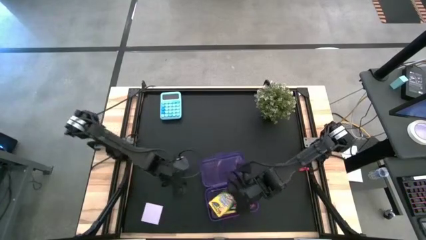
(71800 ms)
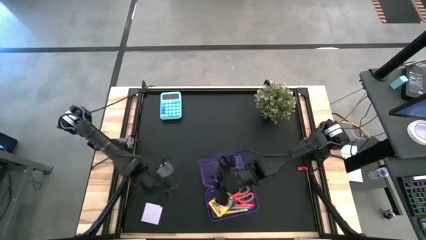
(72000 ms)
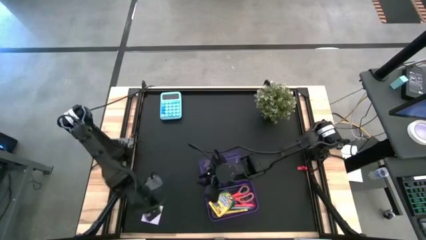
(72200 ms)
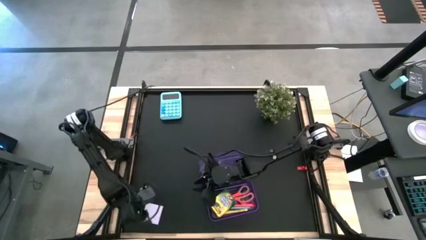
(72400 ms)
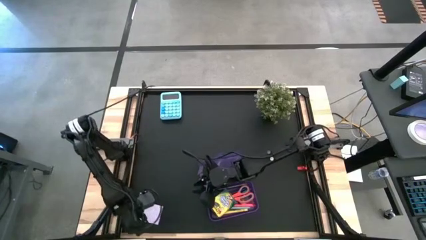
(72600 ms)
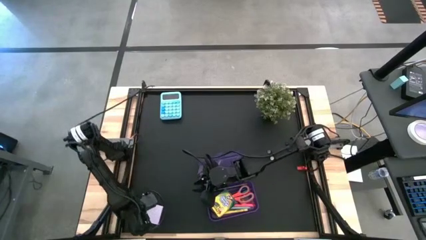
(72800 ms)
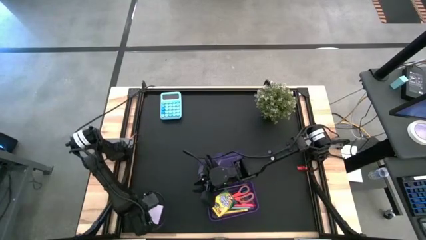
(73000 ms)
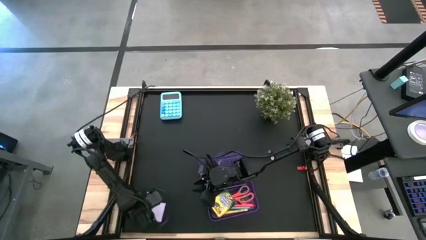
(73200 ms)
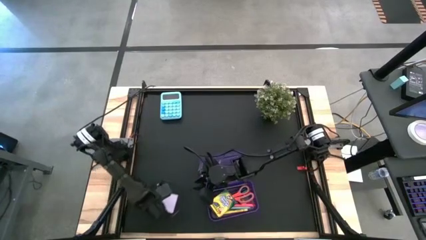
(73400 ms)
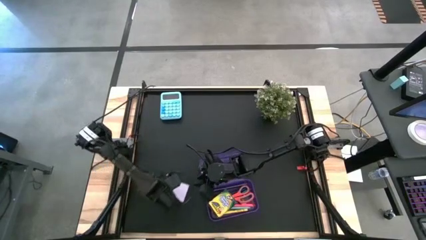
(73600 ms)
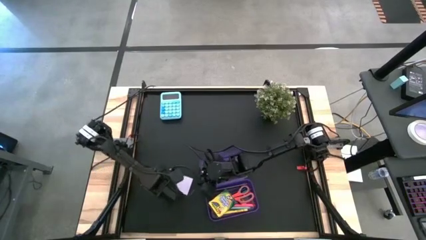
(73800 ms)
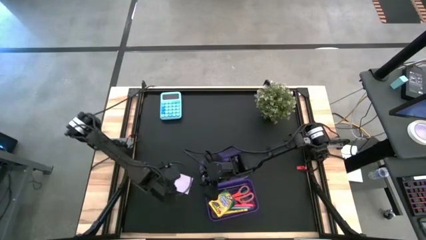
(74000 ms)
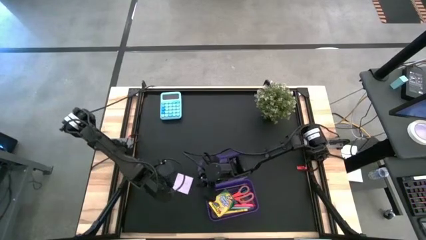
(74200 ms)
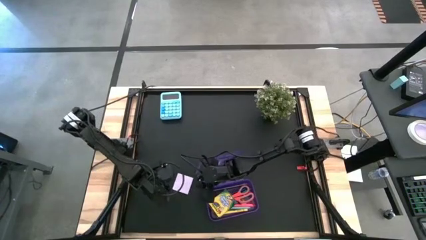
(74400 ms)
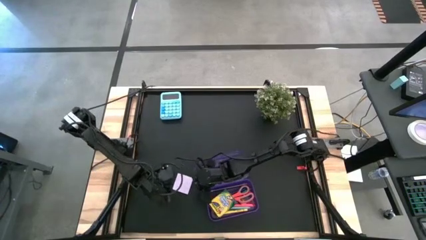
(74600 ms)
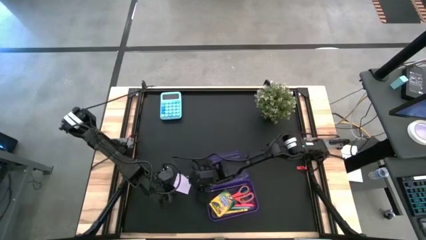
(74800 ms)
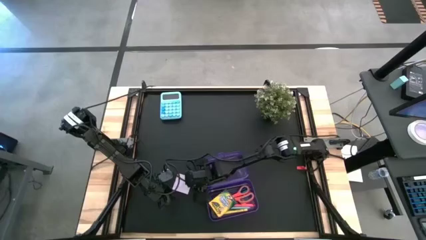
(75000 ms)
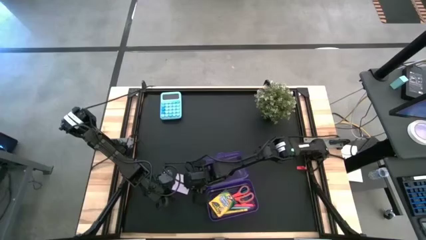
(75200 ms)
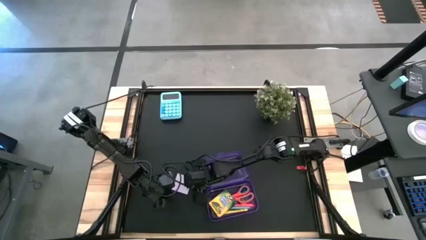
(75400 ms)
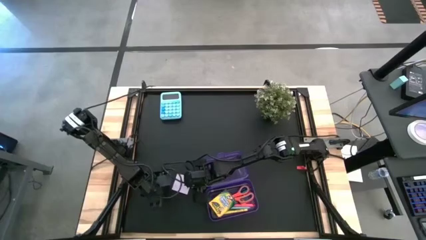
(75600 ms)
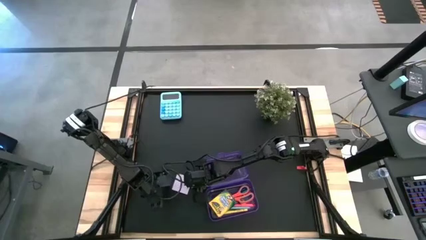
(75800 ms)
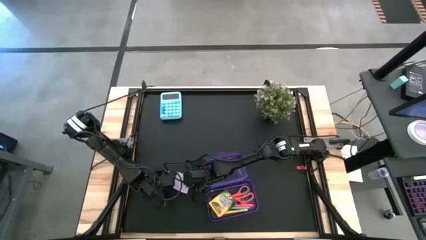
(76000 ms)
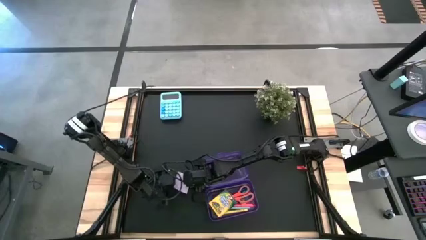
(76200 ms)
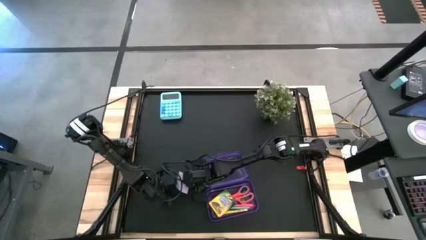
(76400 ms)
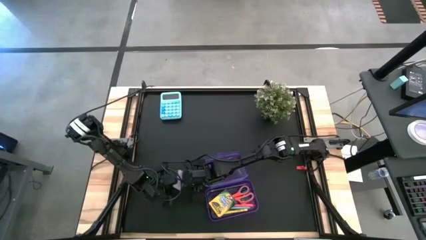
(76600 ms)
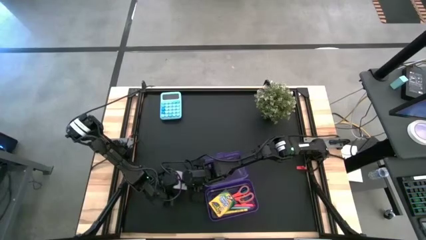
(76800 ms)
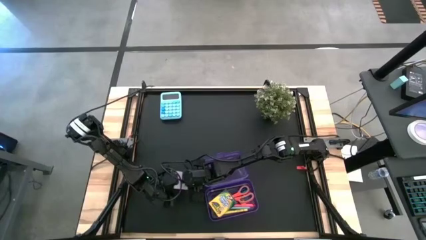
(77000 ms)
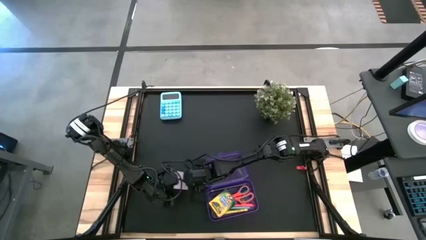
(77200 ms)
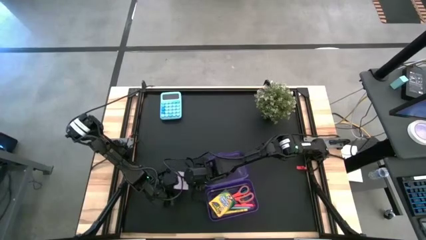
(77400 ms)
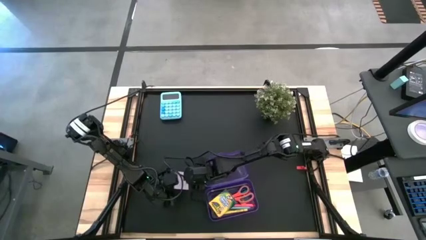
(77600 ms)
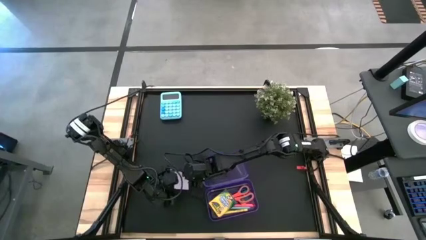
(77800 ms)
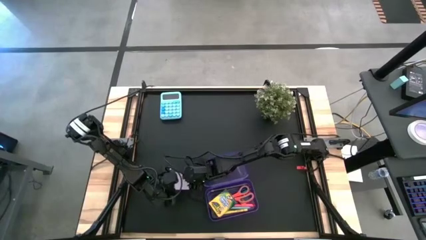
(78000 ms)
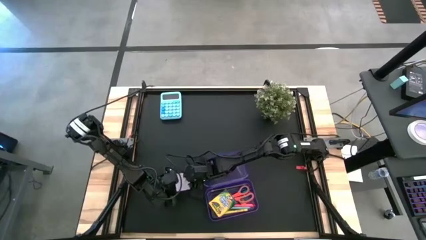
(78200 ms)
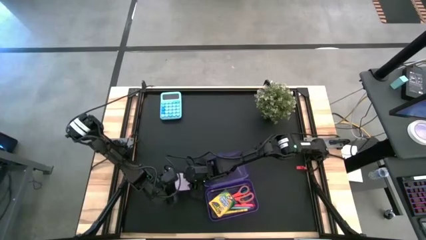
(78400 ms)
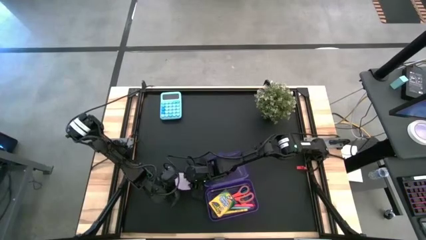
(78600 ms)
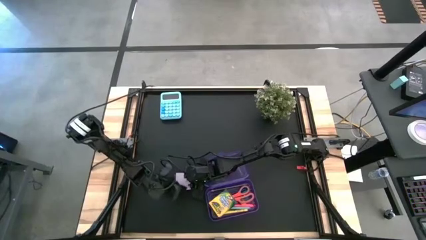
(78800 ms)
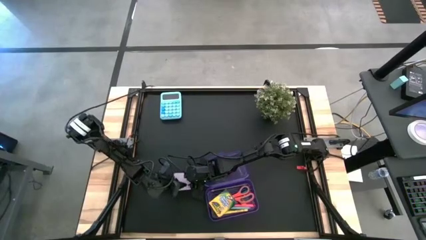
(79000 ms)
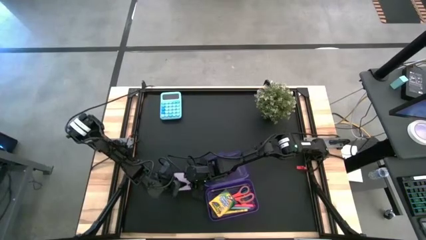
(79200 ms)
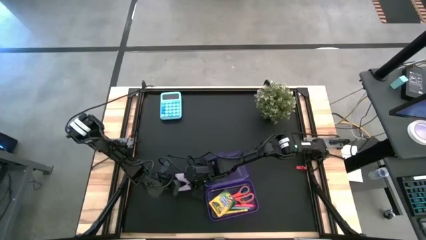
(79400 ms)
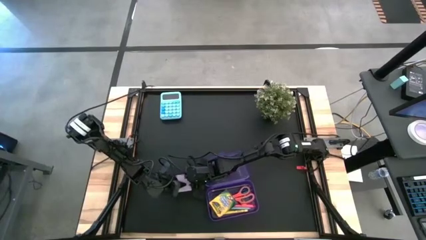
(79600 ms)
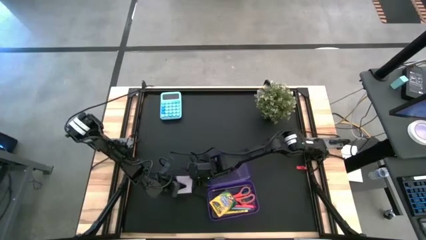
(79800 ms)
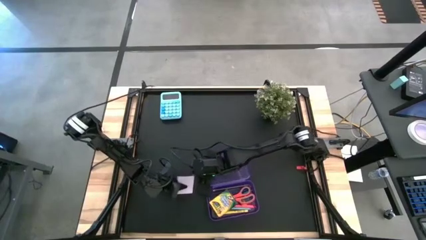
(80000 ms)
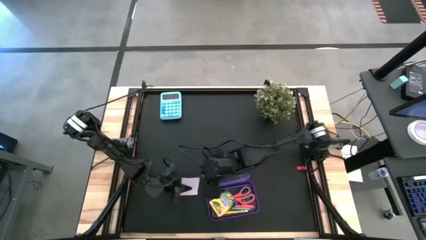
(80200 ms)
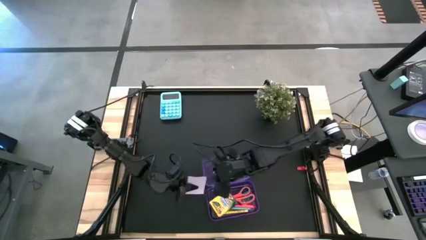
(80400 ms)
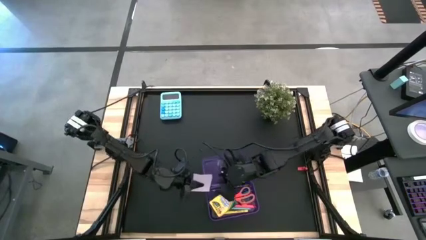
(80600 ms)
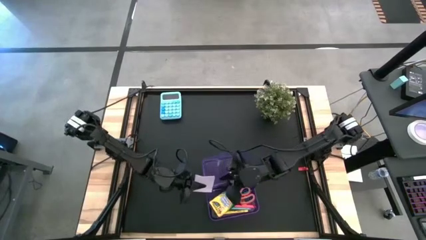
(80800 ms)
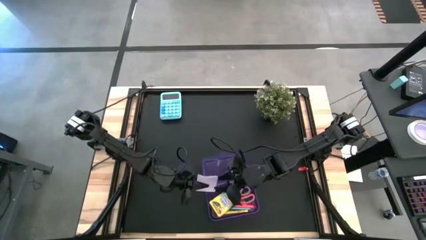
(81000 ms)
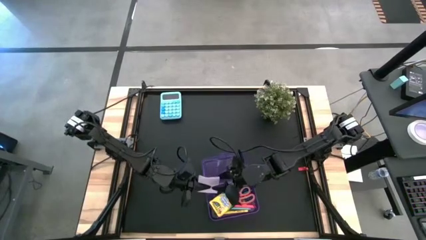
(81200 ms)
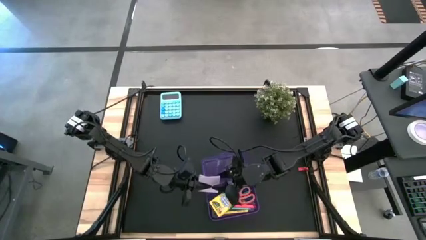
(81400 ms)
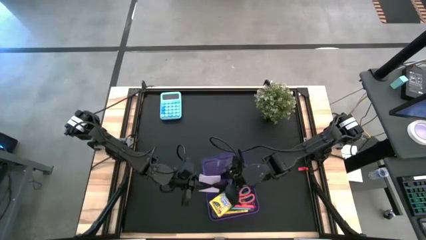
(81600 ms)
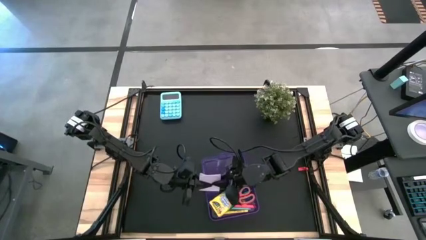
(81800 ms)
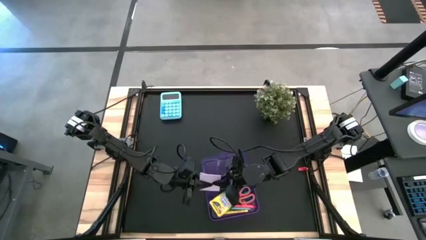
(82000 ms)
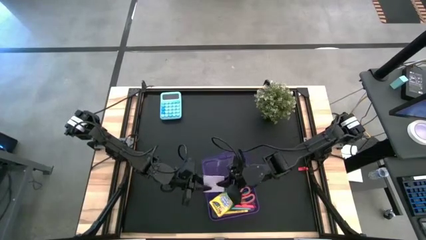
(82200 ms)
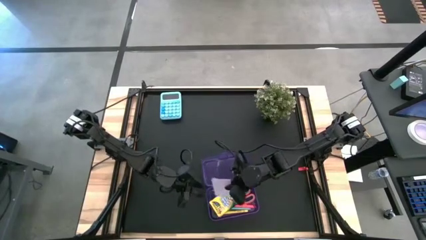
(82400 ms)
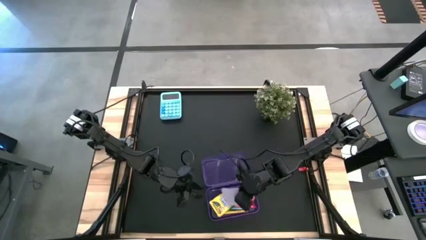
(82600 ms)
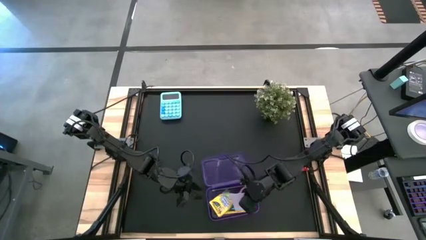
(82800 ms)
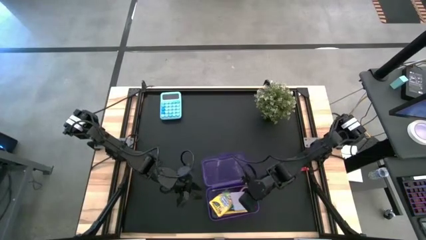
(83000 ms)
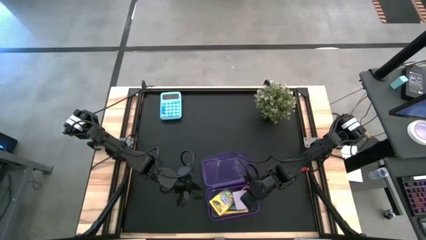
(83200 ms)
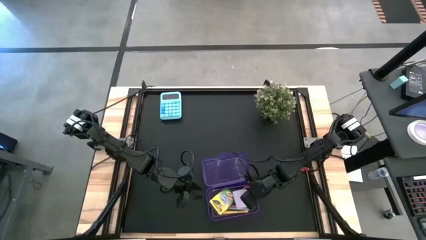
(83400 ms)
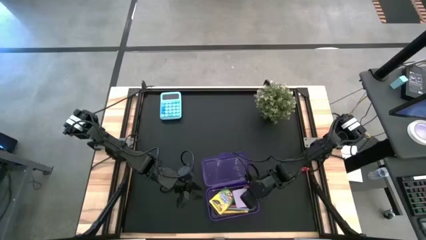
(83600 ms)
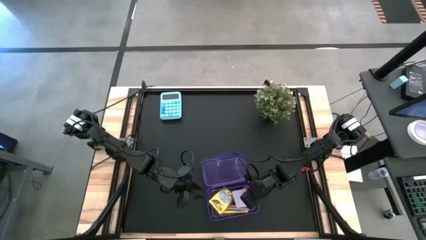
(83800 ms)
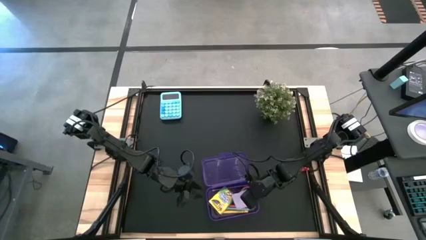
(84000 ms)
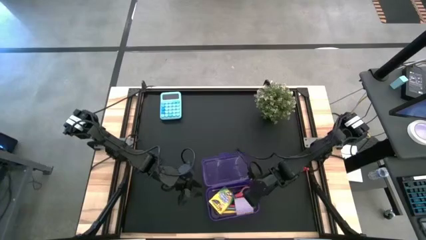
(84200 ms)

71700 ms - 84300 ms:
Task: Pack school essentials
Put the pink sticky notes into the purple supply box

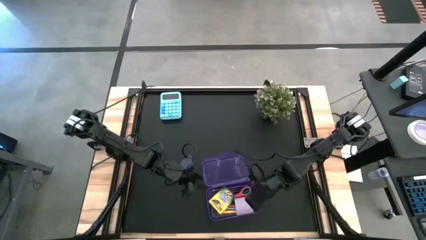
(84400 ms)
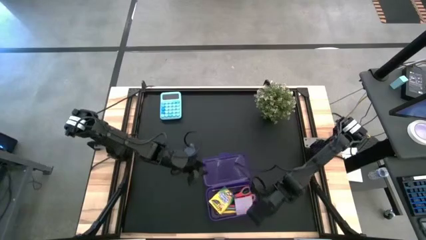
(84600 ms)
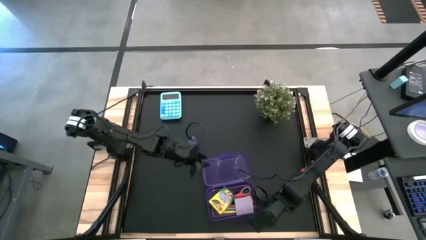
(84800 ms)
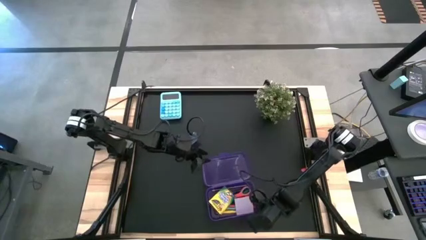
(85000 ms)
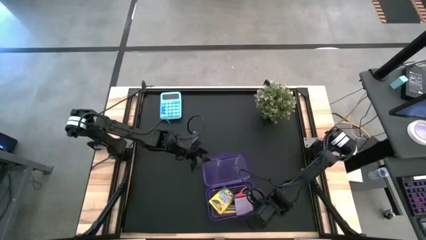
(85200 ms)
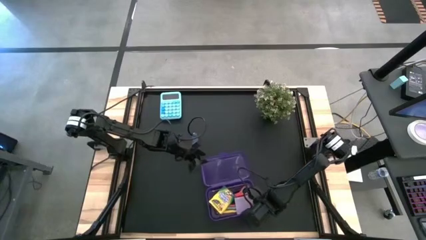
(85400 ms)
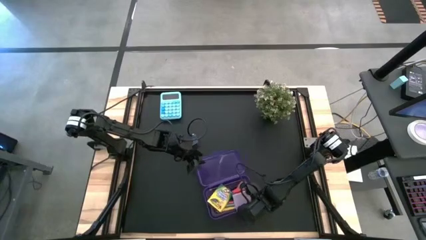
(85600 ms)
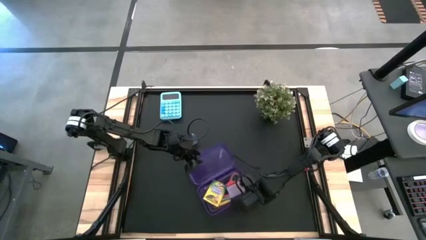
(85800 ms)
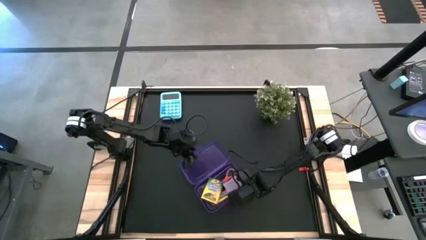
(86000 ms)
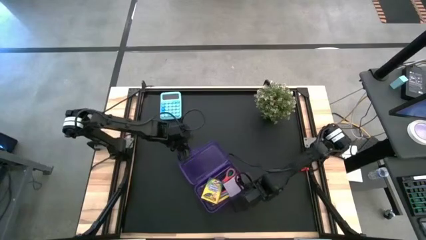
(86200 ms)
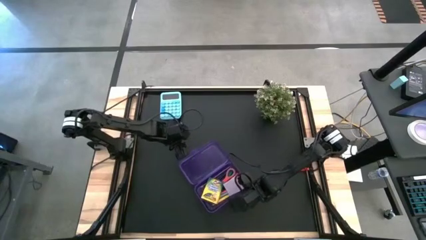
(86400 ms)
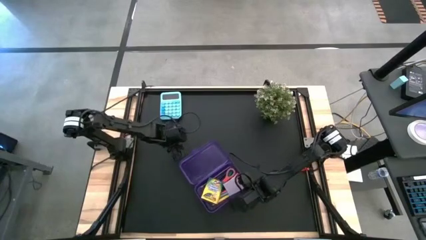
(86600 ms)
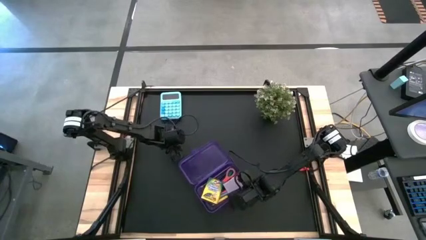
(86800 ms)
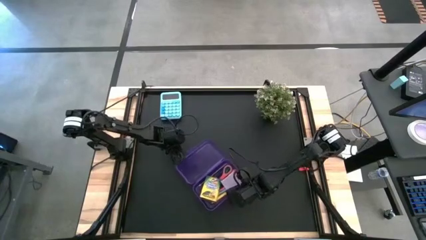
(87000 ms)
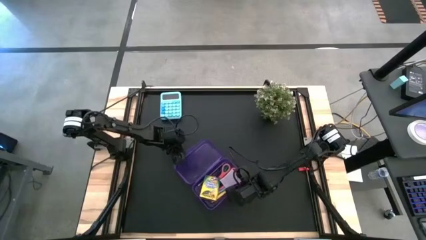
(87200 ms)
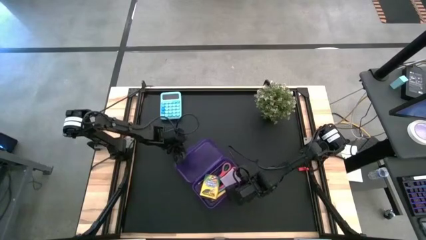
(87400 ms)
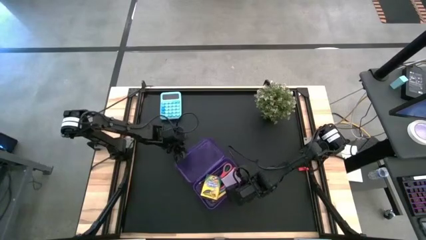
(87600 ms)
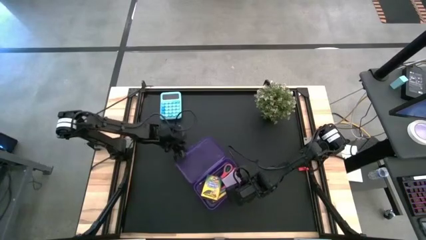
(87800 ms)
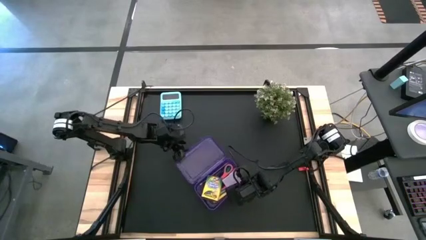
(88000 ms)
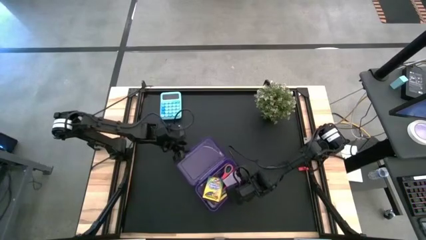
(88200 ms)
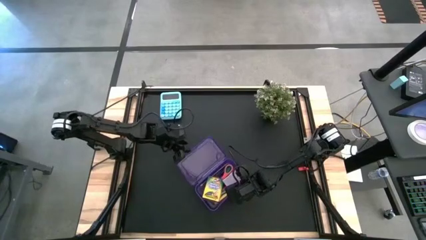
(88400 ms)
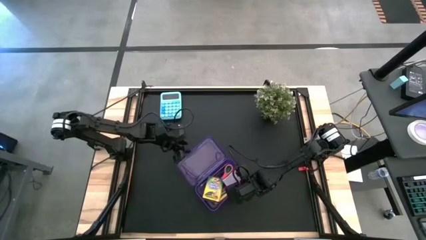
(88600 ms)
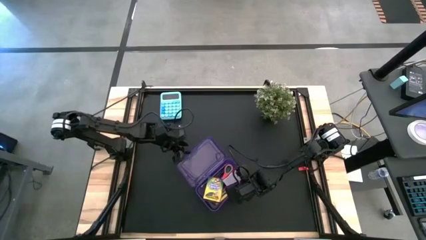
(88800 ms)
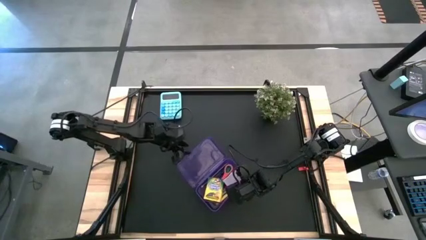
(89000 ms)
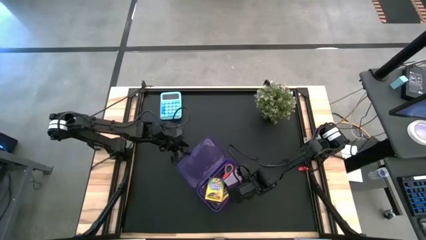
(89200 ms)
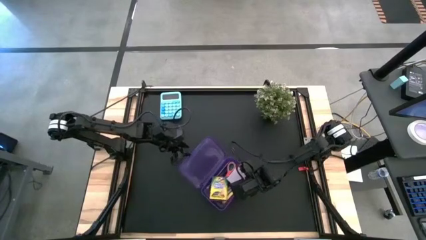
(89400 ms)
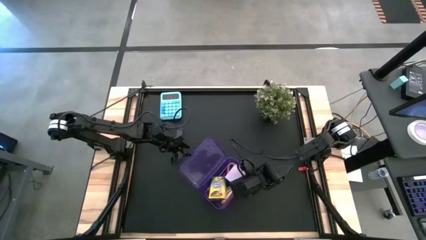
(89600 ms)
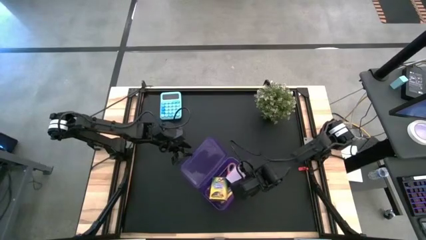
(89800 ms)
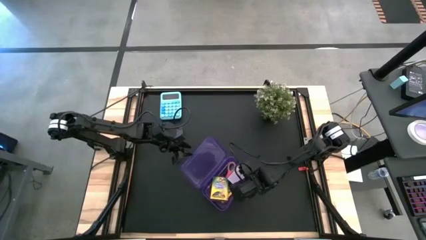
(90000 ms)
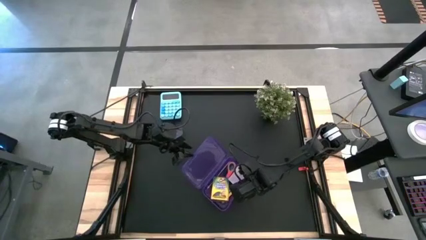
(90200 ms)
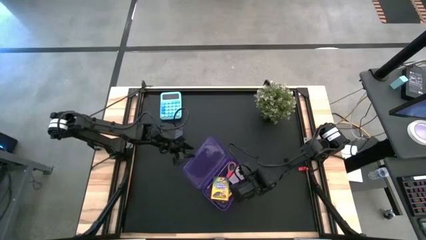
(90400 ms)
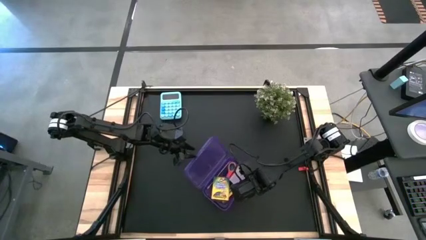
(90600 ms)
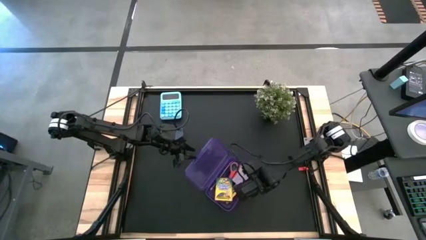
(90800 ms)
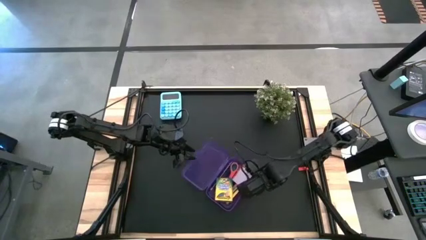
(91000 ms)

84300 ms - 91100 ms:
Close the purple supply box
